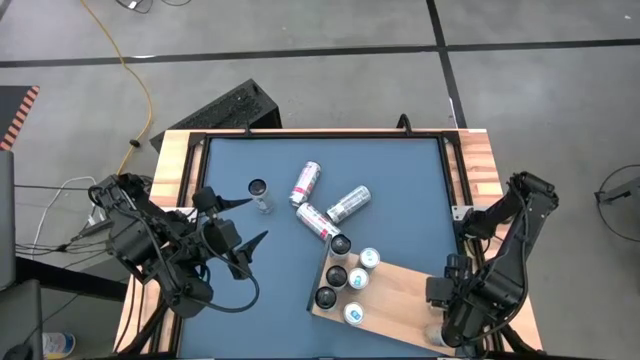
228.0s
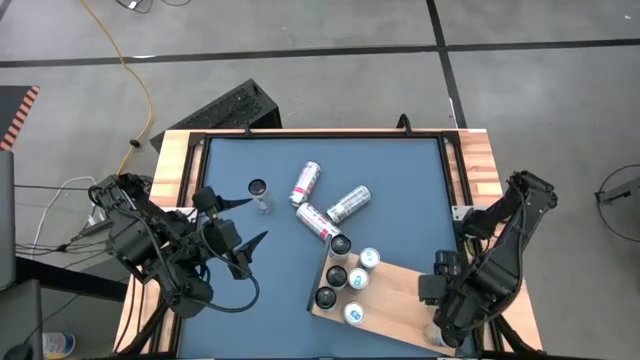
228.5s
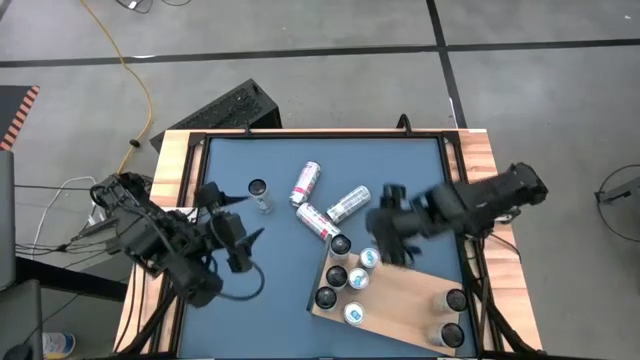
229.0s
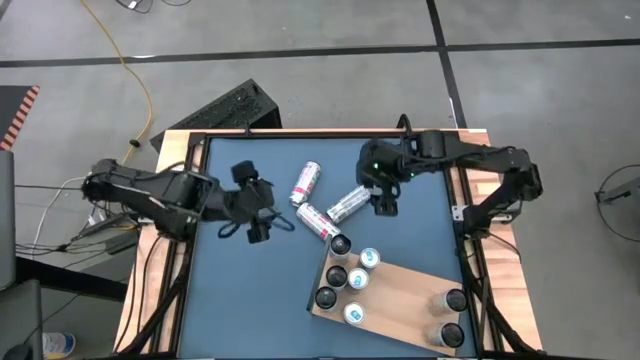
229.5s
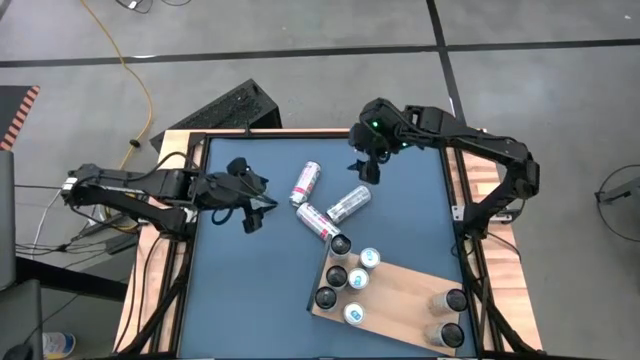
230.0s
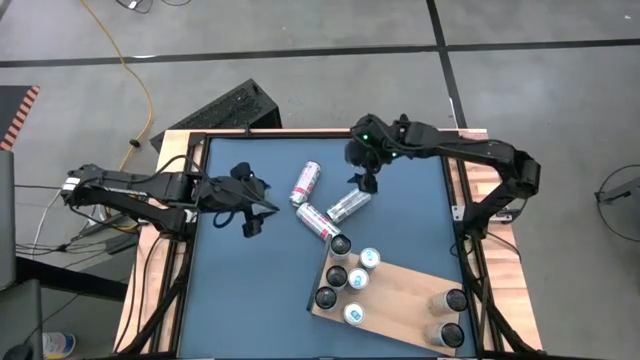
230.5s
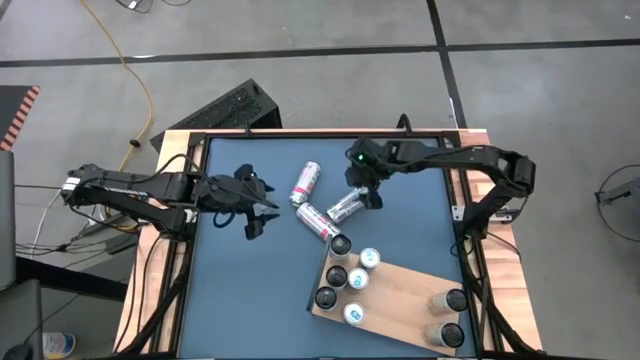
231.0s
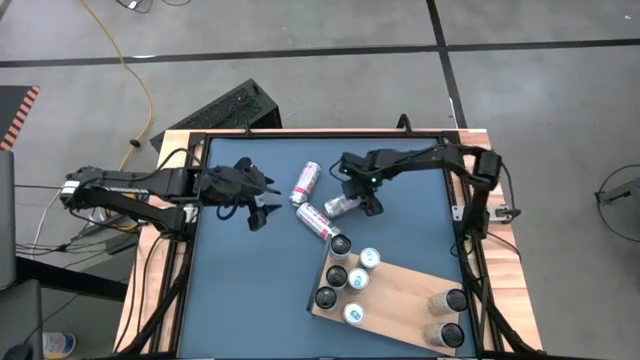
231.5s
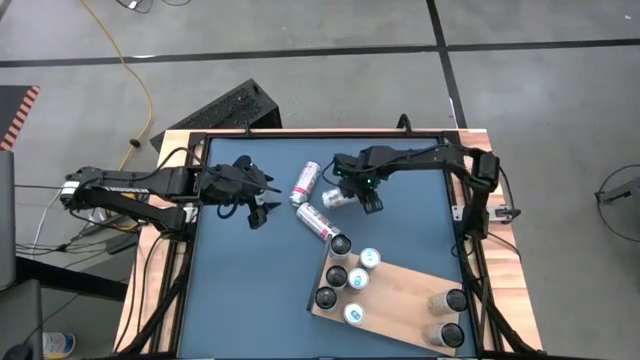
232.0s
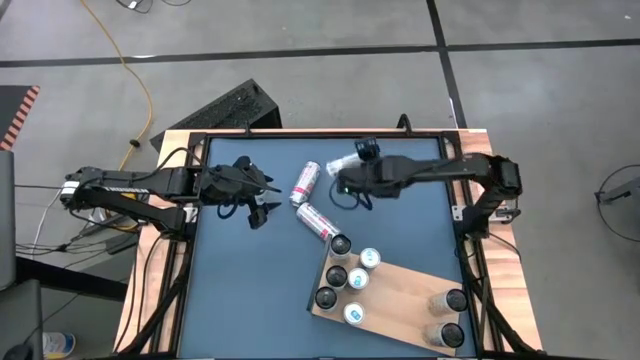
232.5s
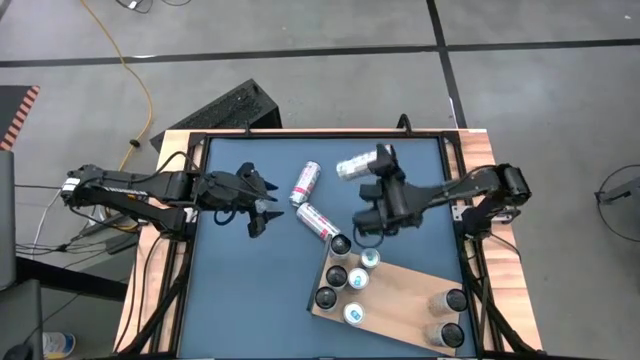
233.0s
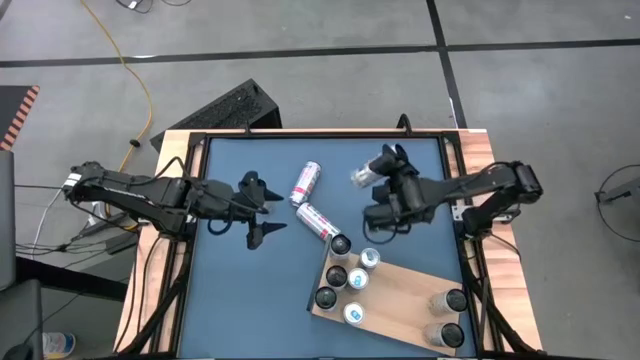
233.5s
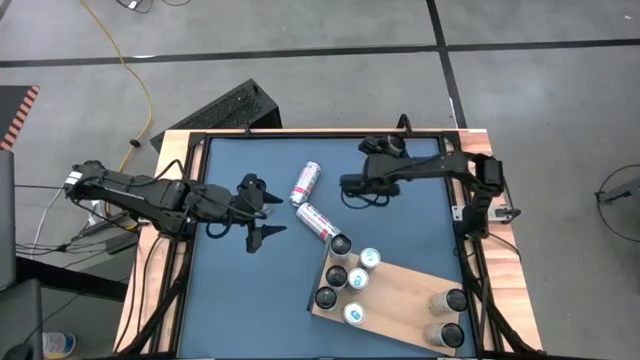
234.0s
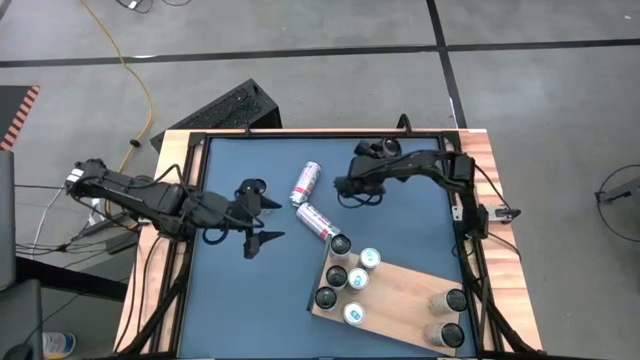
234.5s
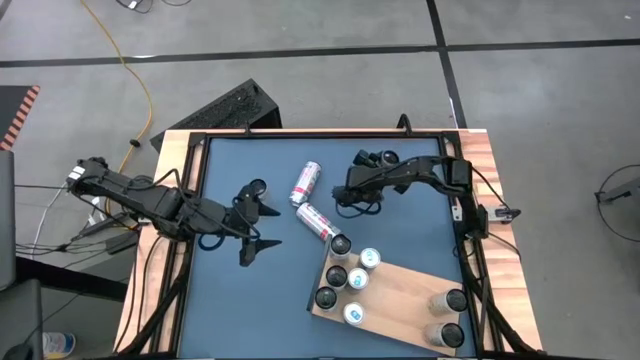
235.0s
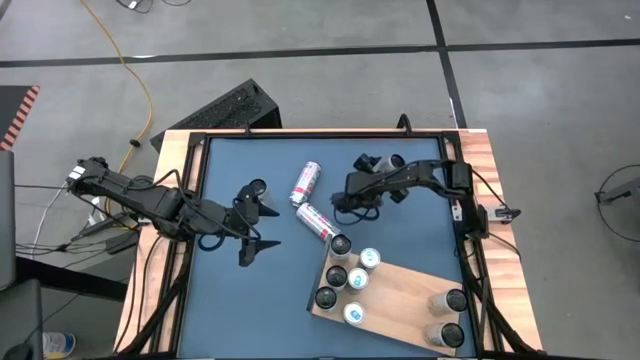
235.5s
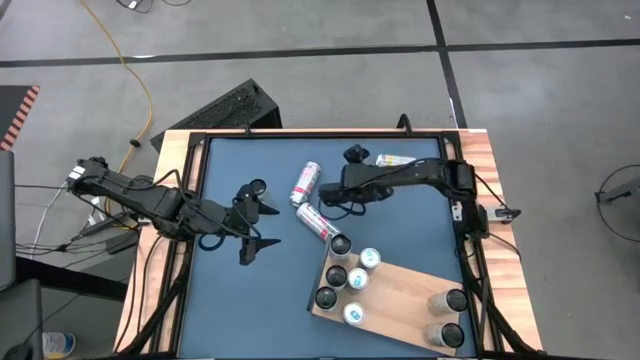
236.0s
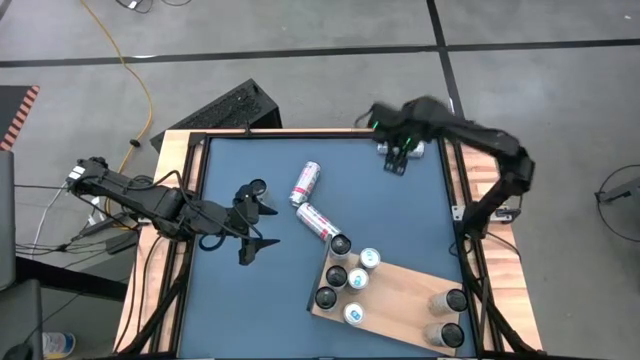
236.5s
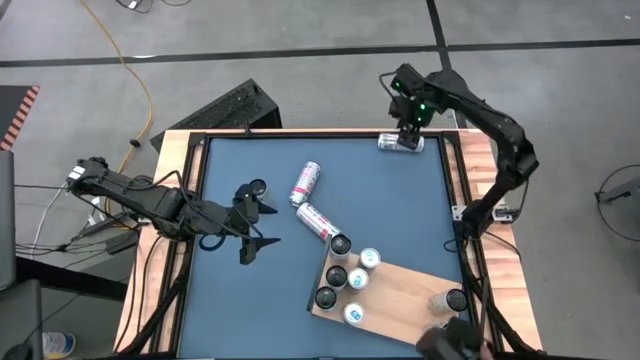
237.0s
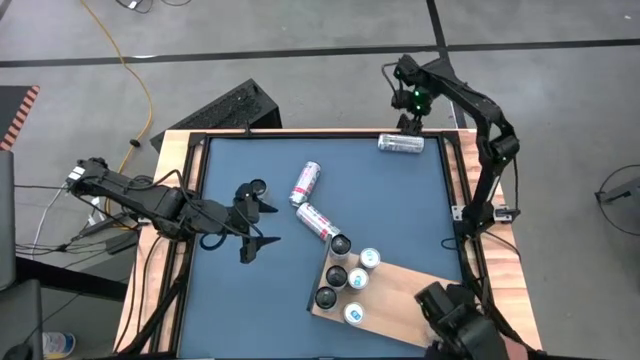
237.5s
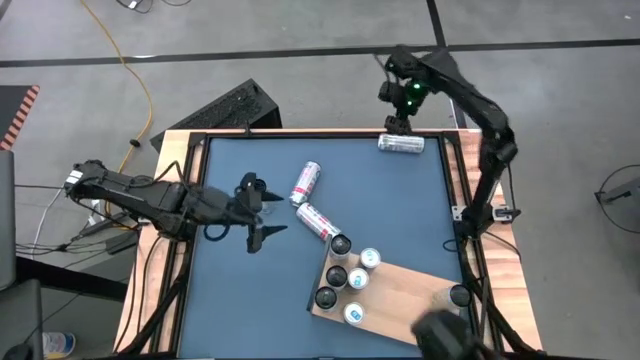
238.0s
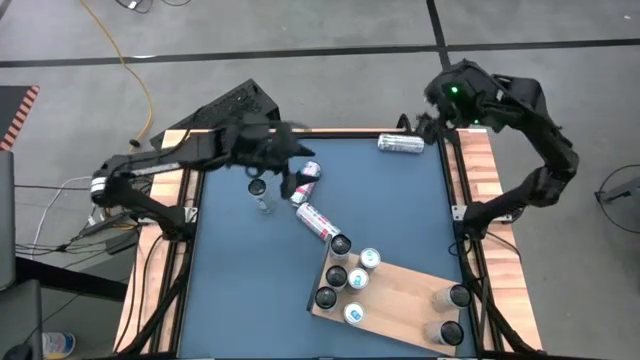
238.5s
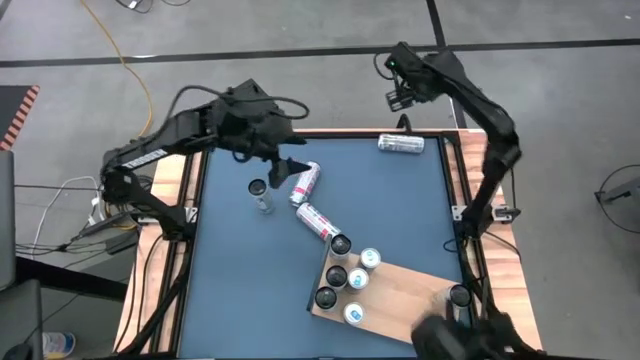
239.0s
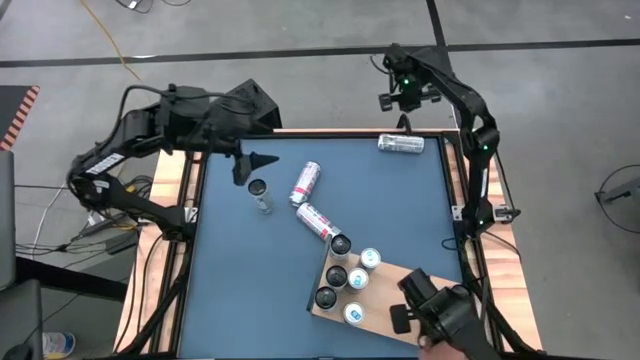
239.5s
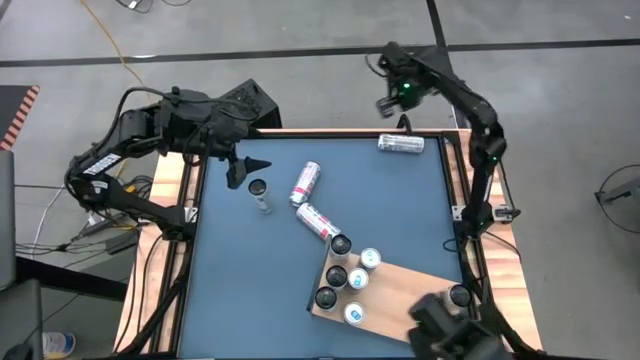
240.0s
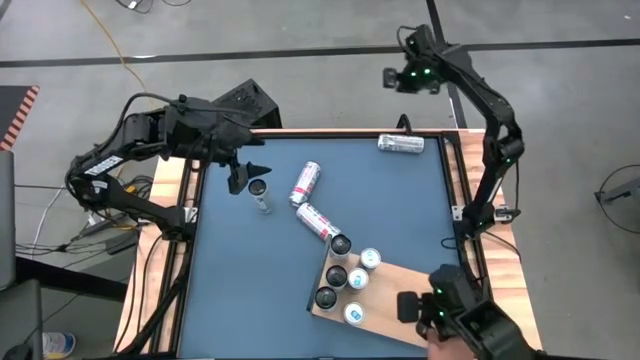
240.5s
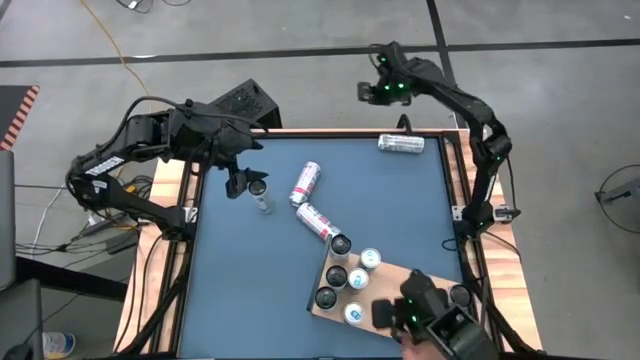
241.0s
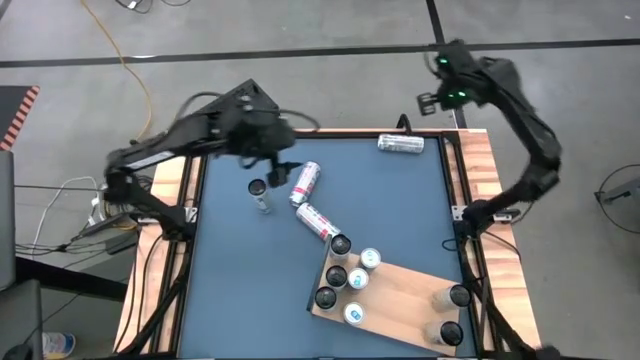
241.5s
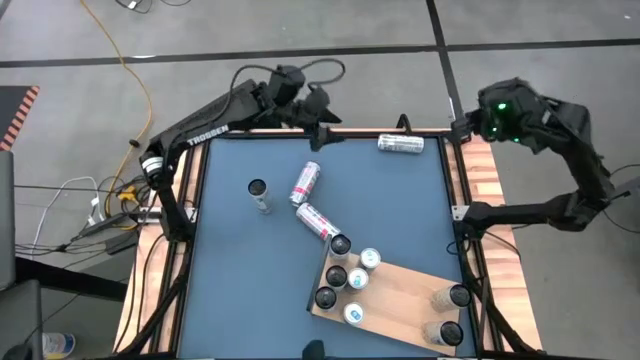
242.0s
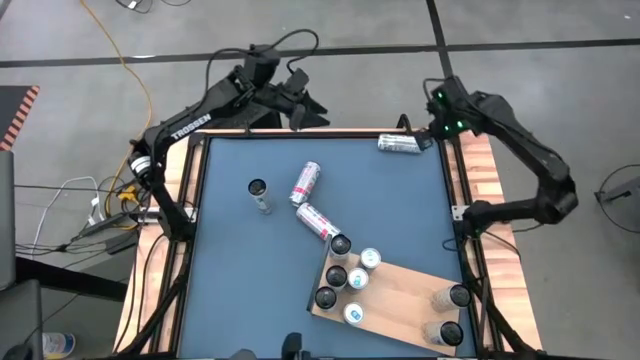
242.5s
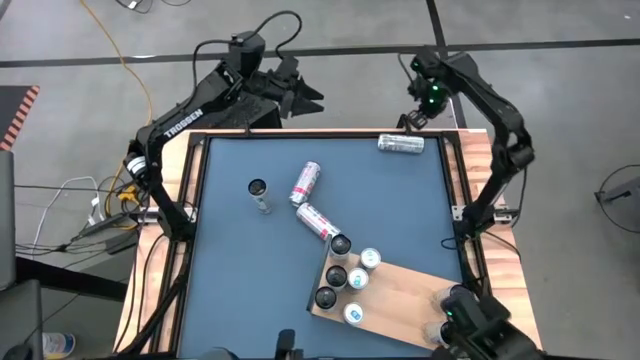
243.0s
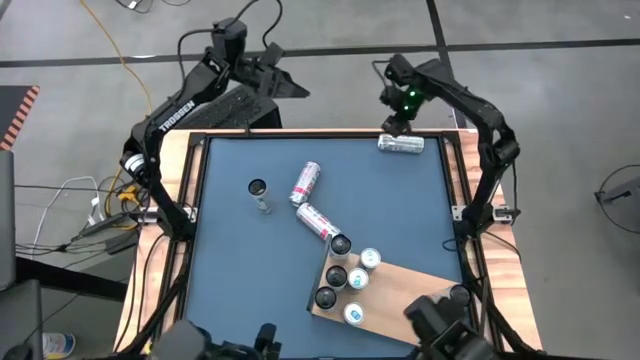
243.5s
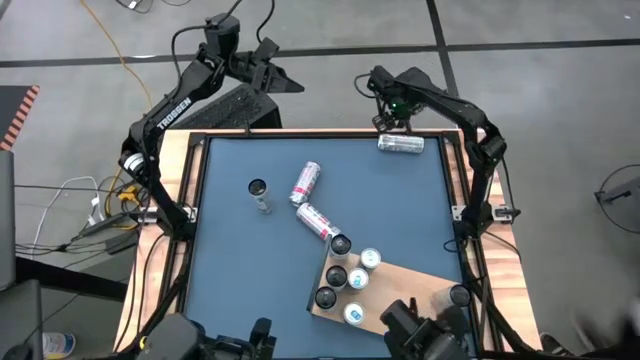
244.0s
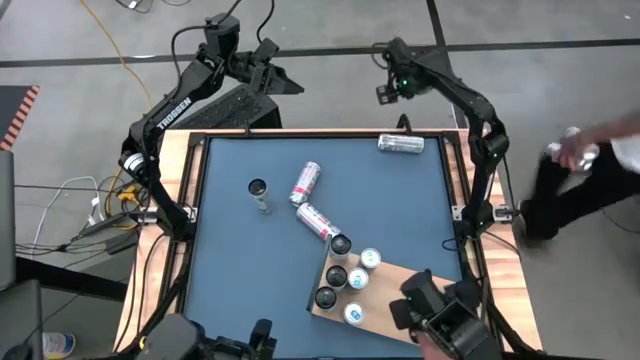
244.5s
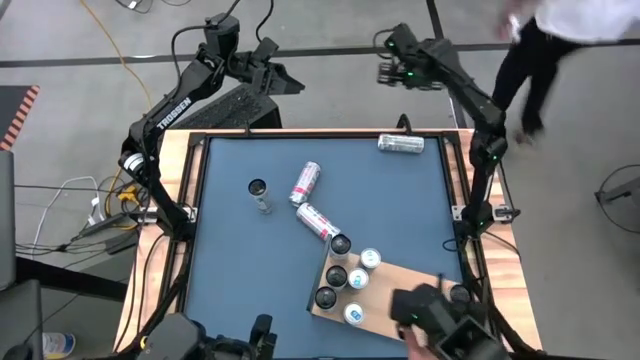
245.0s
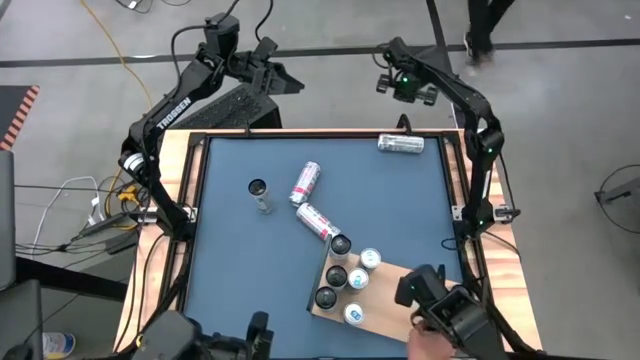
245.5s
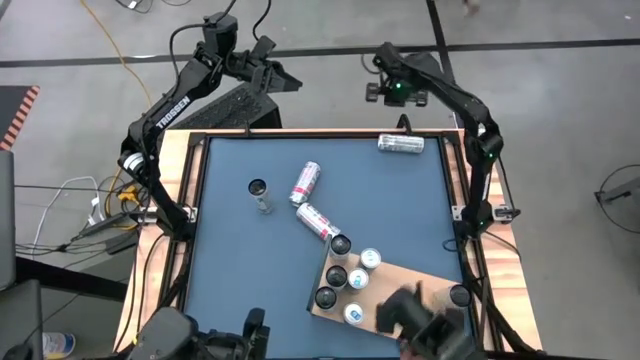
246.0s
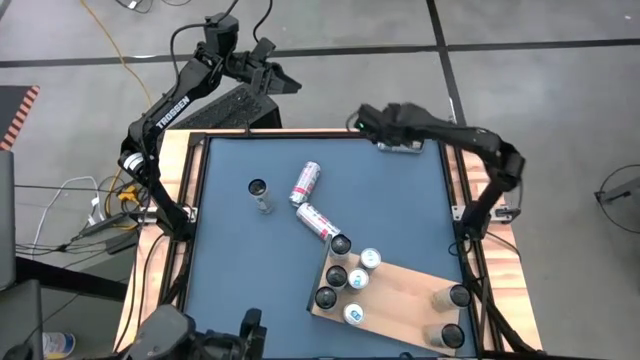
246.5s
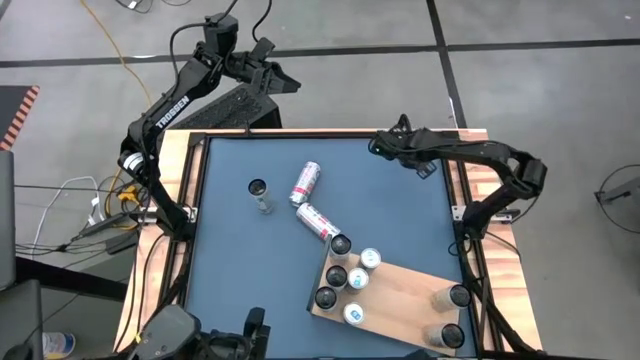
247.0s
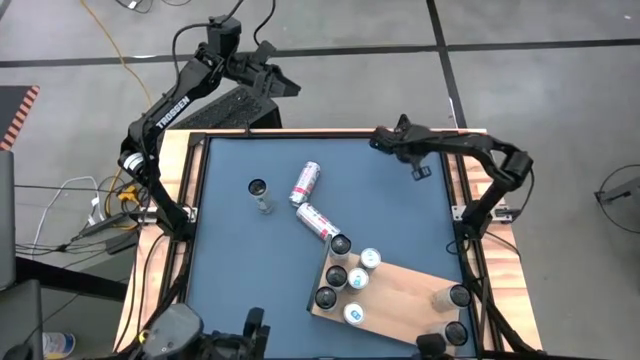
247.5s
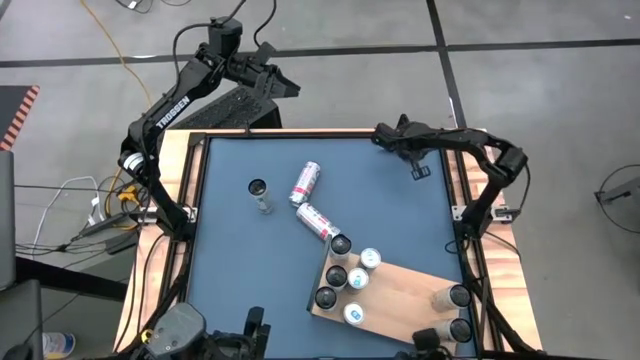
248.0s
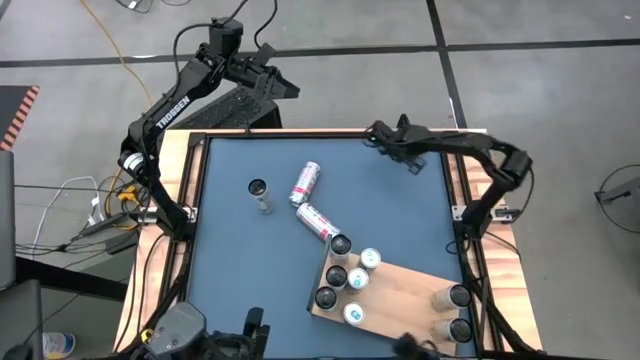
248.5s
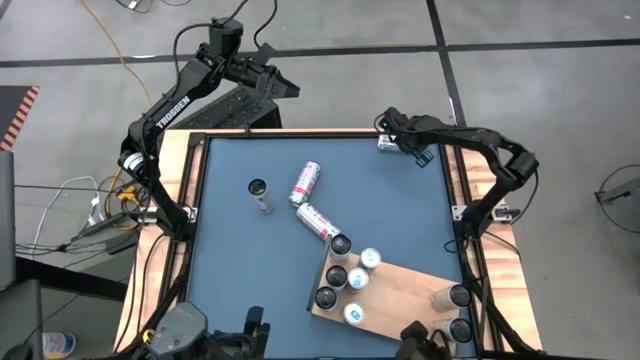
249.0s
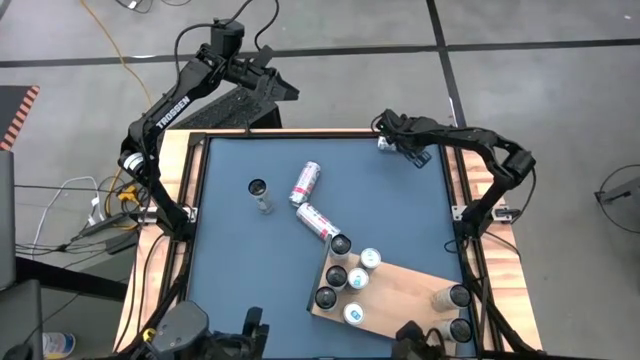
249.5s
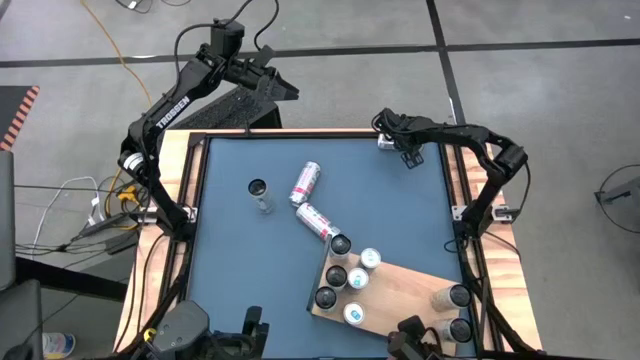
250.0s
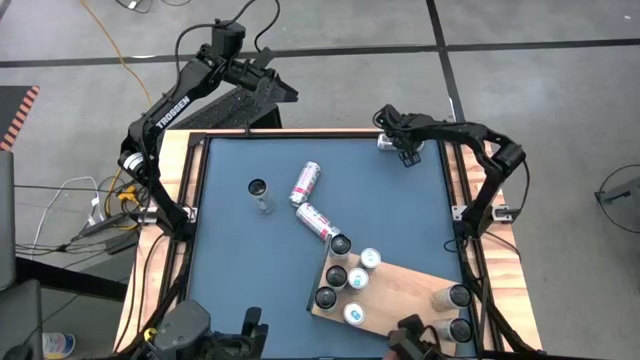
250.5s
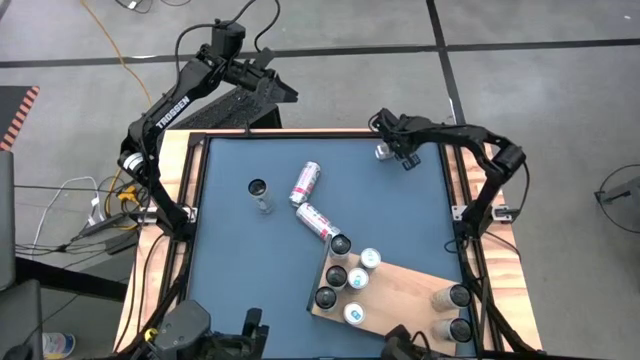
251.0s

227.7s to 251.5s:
Task: Place canned beverage on shelf
Put the white yellow soda can on the shelf
